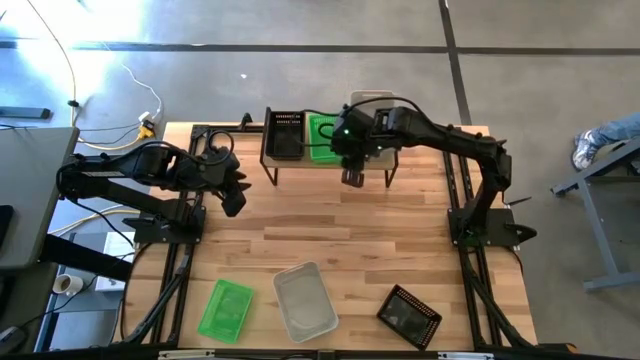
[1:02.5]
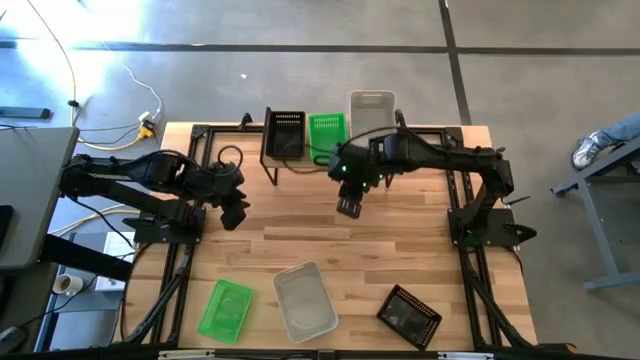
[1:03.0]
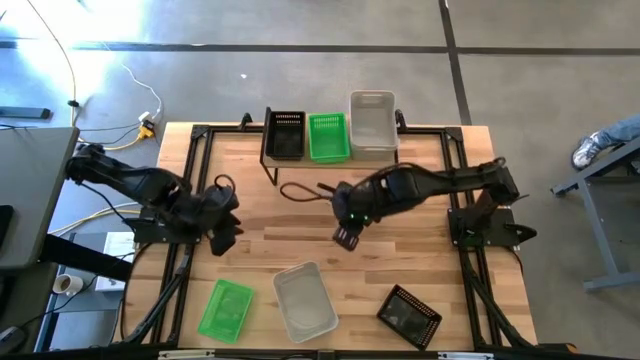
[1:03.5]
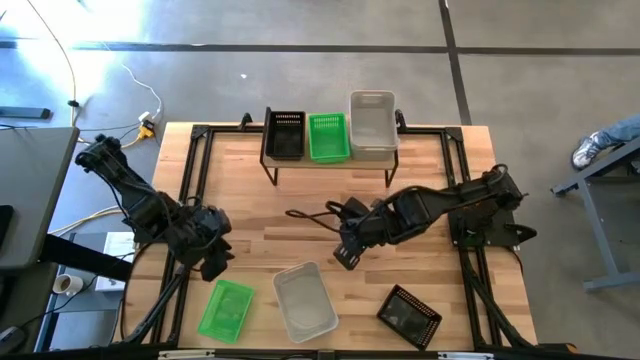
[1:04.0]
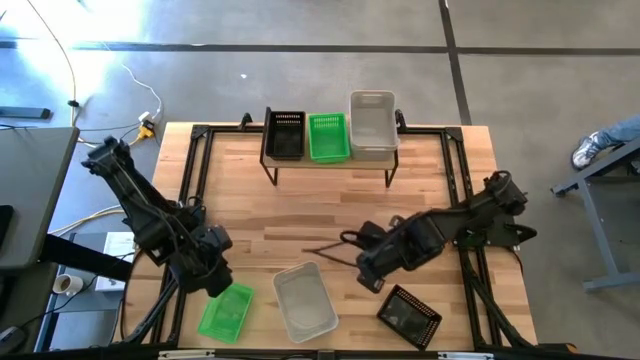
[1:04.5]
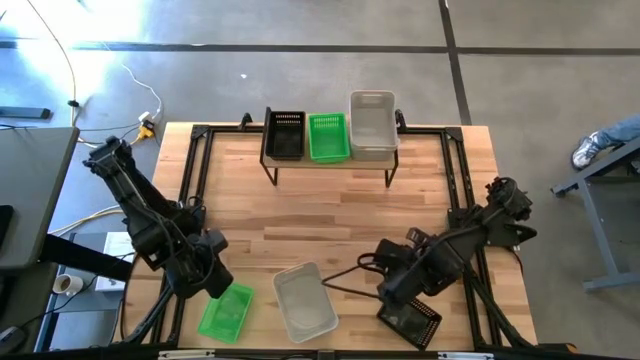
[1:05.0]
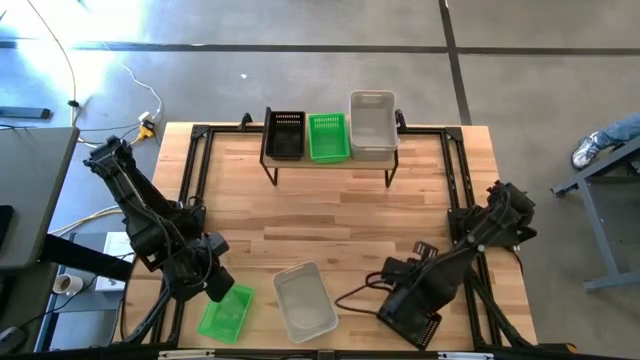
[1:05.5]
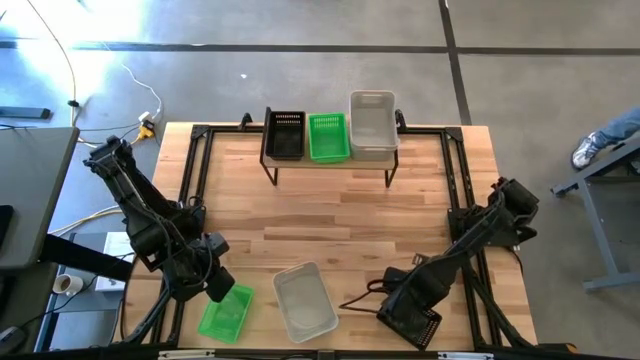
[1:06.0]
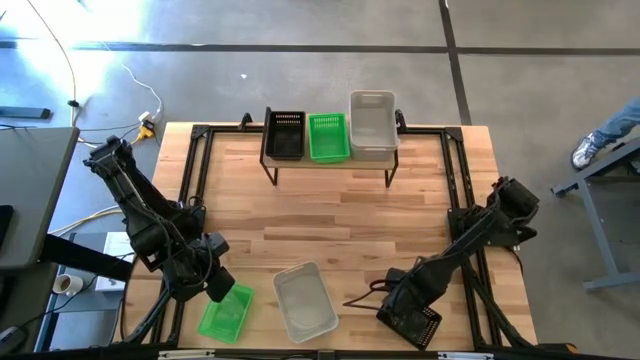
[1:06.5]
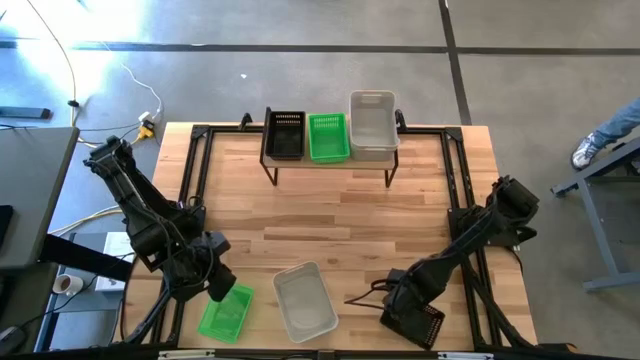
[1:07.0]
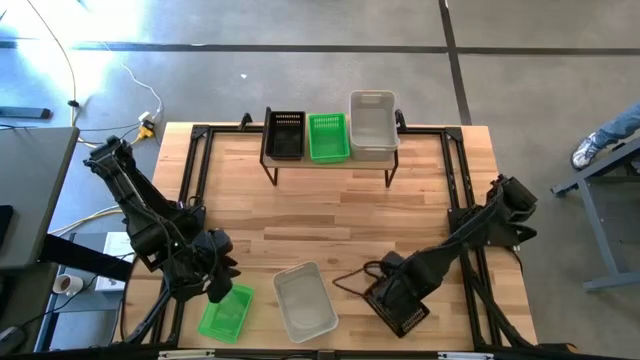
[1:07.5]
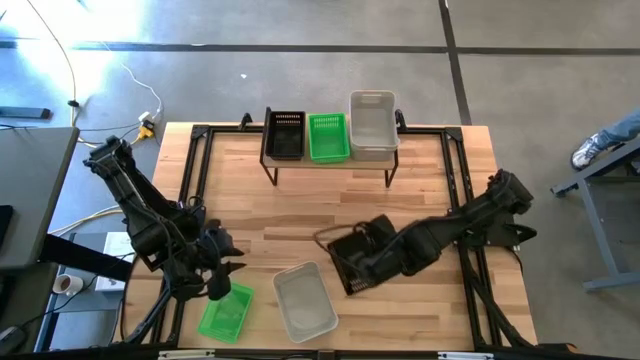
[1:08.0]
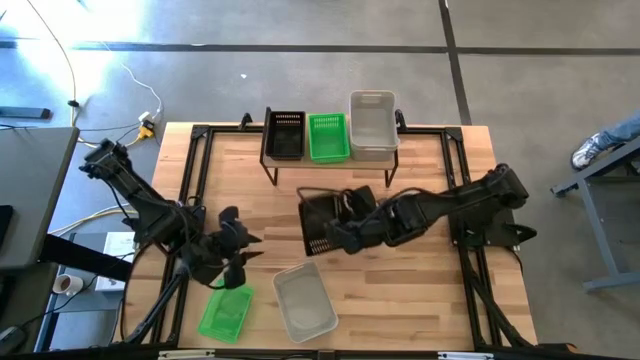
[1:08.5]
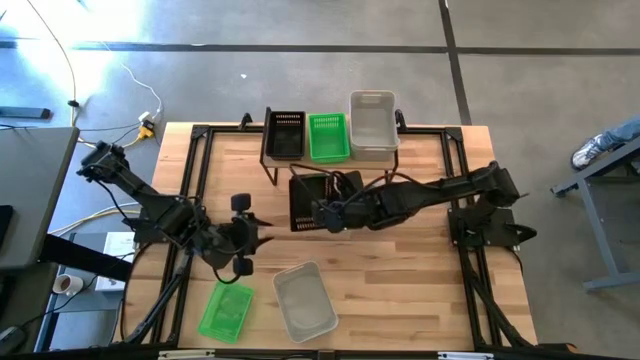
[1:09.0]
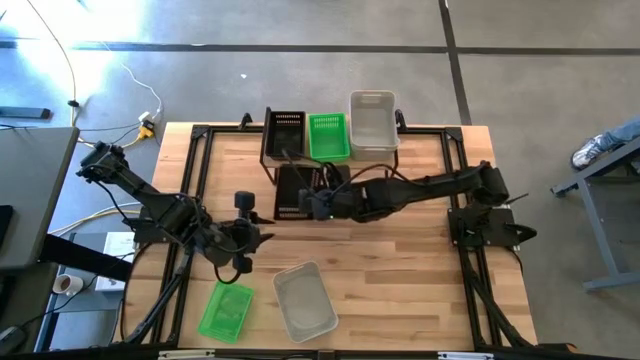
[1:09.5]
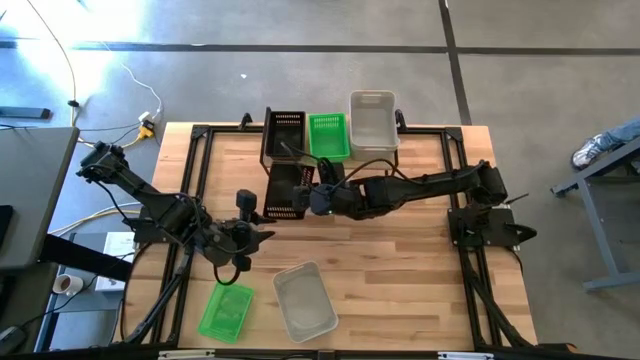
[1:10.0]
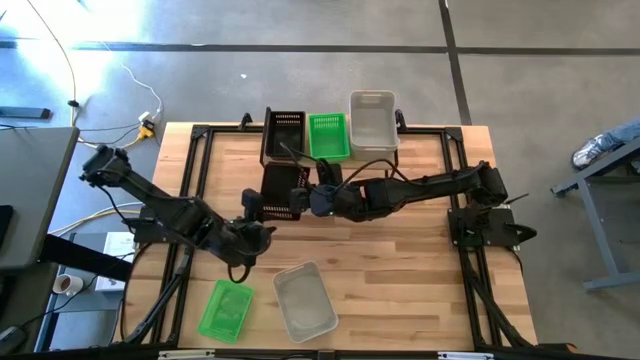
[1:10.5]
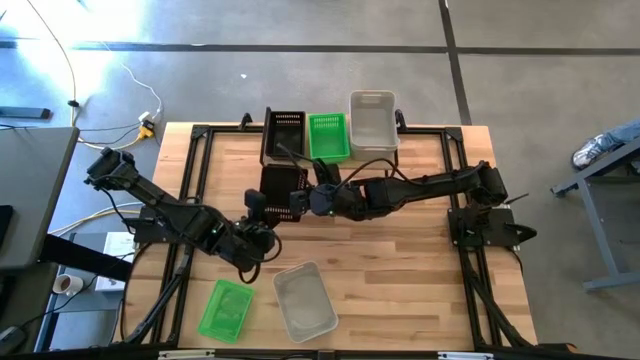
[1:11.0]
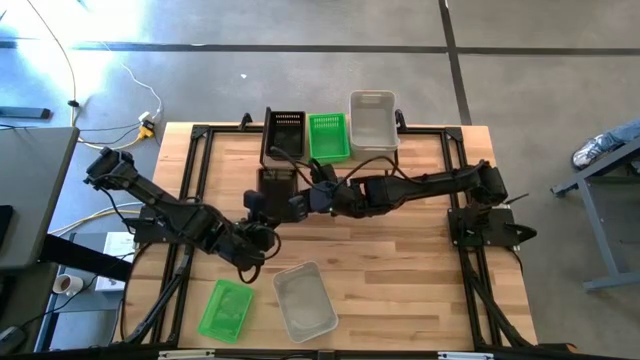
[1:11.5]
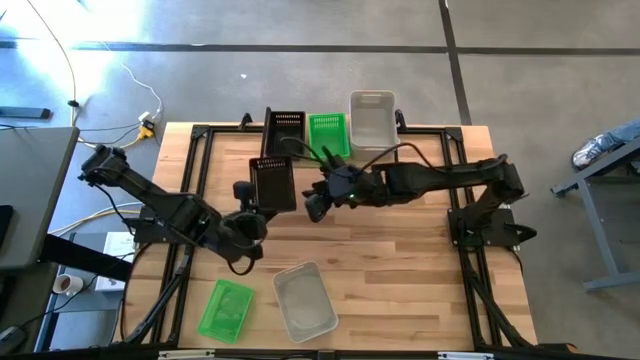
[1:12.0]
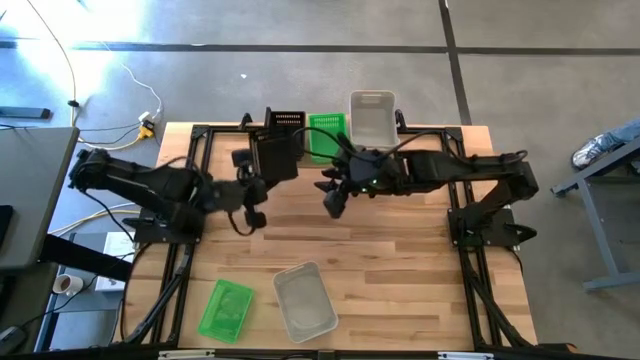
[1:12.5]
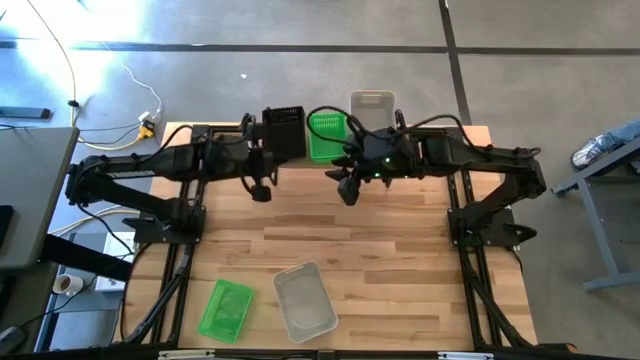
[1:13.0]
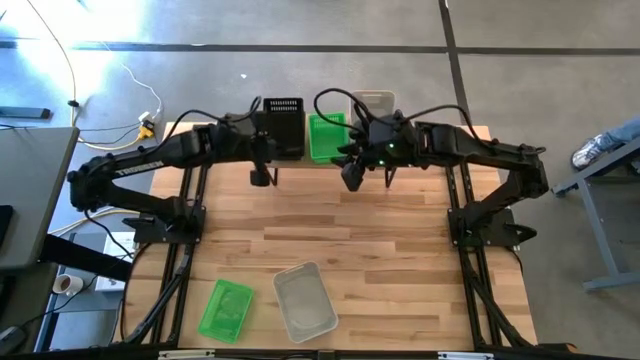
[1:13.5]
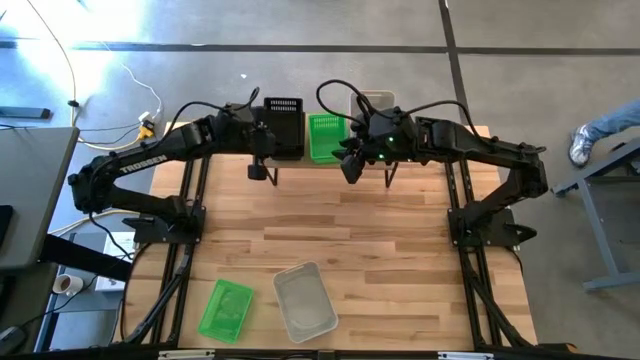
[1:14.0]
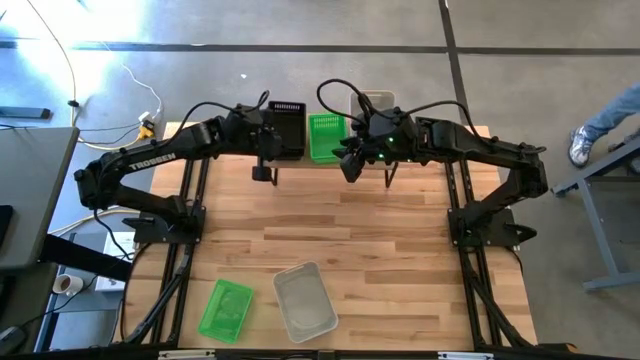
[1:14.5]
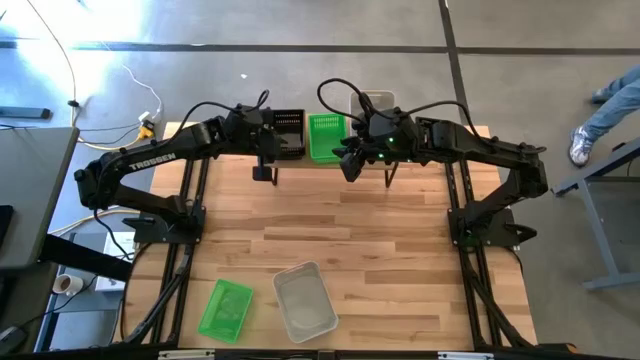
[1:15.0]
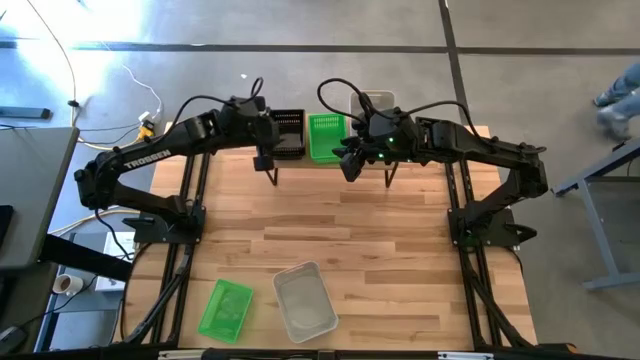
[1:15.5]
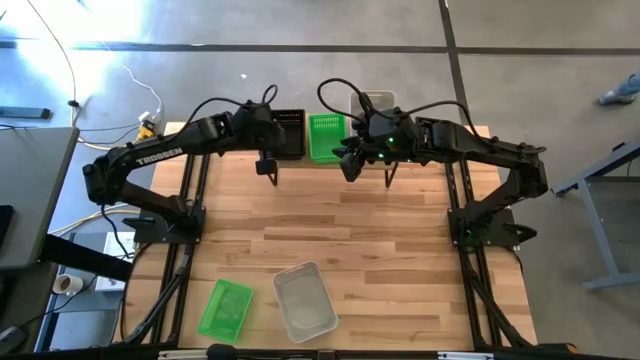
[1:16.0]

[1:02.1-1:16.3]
Task: Stack baskets on shelf by color
Stack the black bin on top of the stacked black bins on the shelf

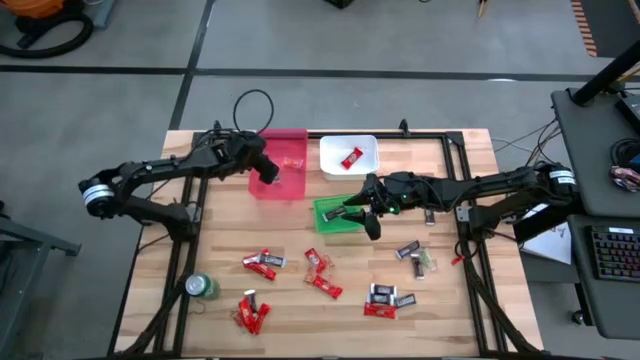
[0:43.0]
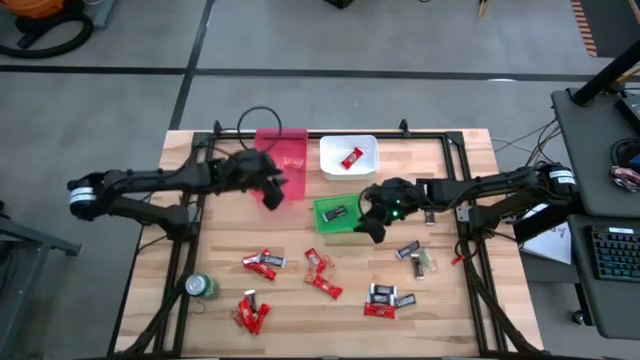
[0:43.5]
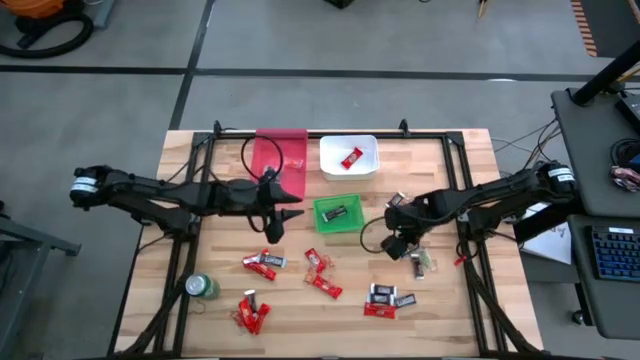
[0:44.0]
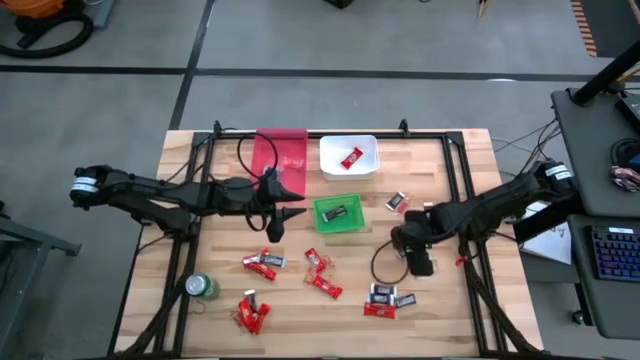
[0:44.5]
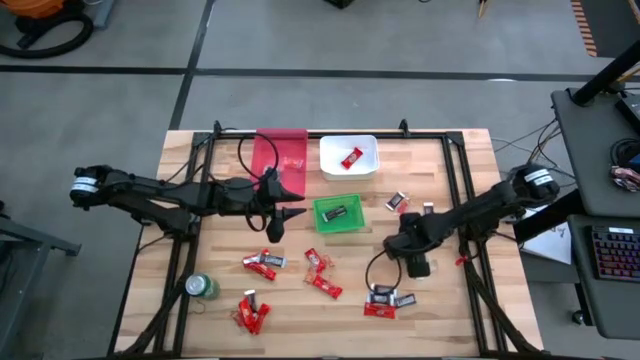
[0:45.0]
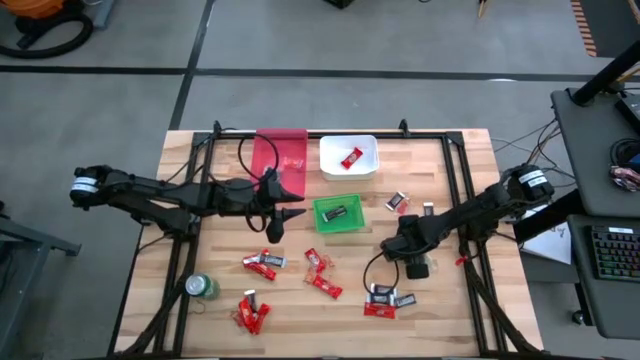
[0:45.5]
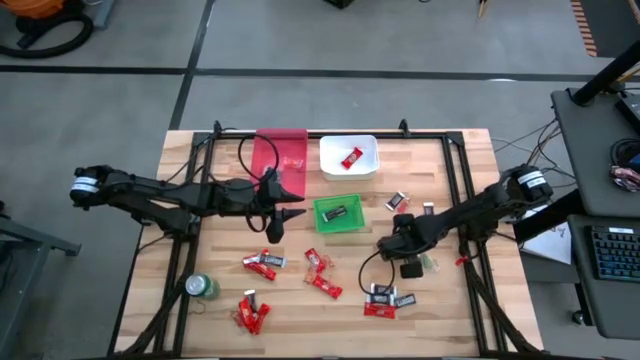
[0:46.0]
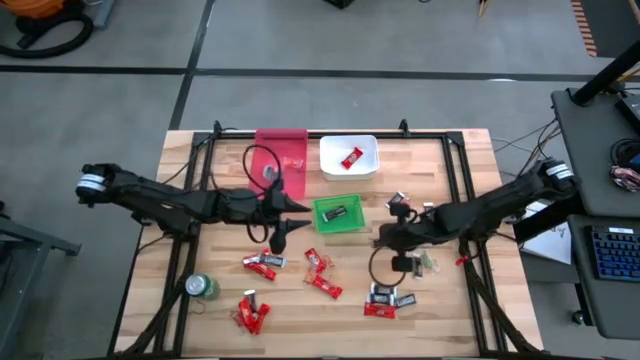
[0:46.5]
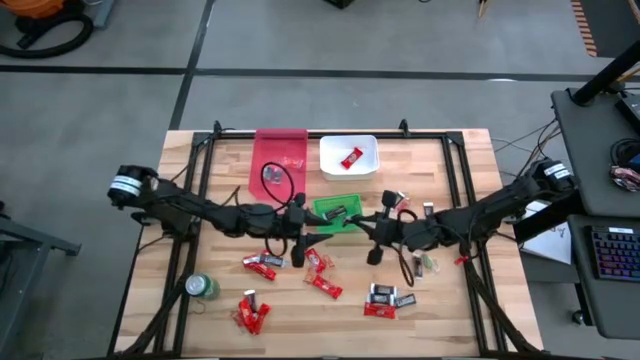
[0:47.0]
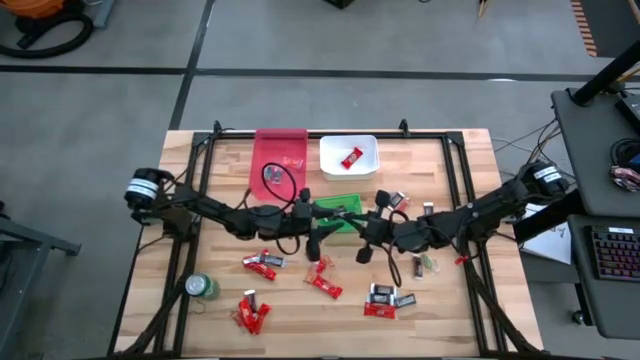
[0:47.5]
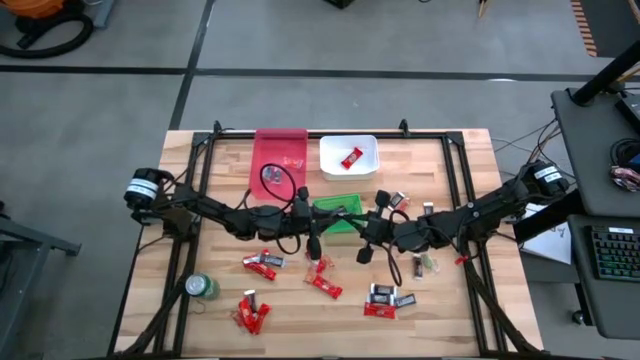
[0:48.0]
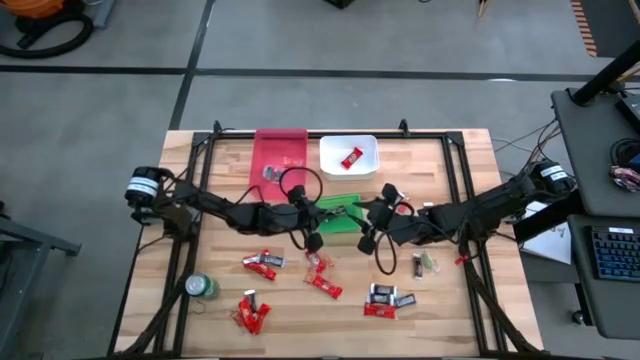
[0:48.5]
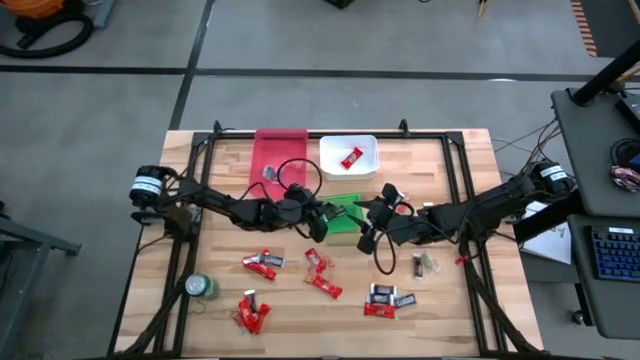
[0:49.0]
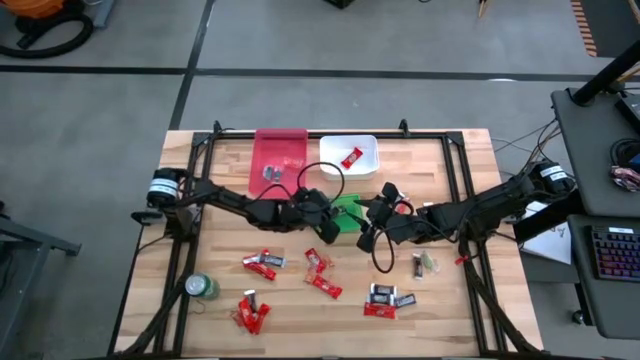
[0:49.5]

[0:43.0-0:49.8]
Task: Sort candy
Put the brown chocolate bar into the green bin
